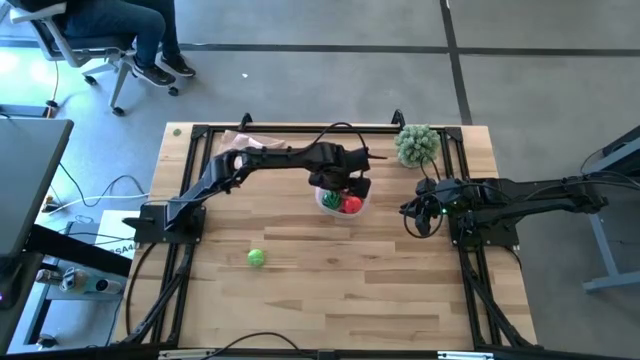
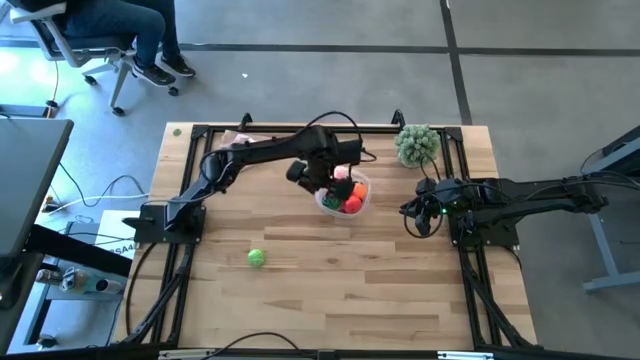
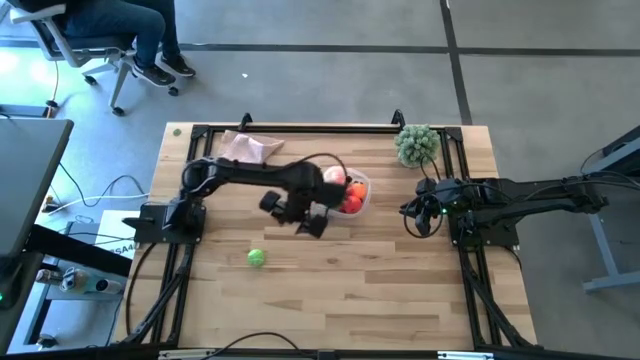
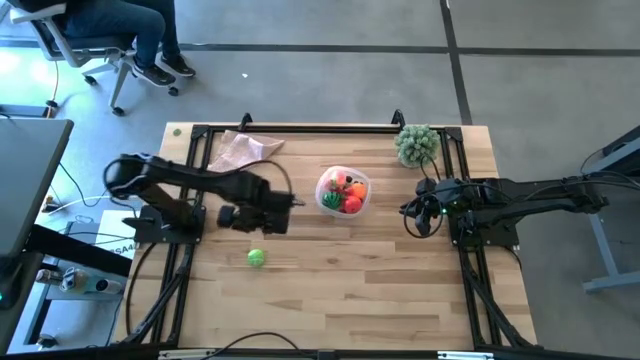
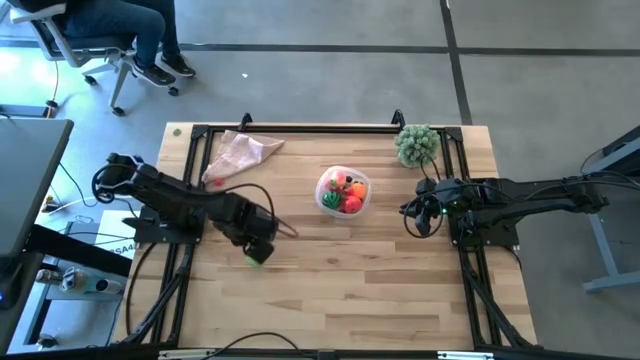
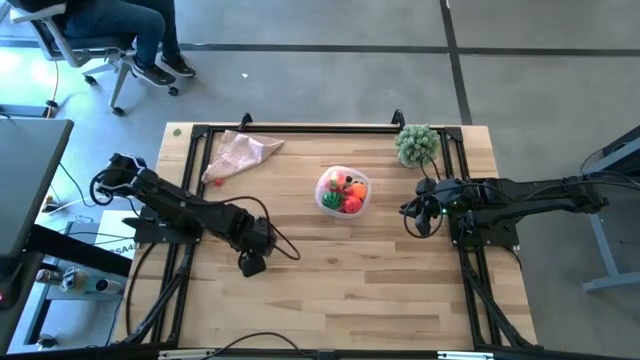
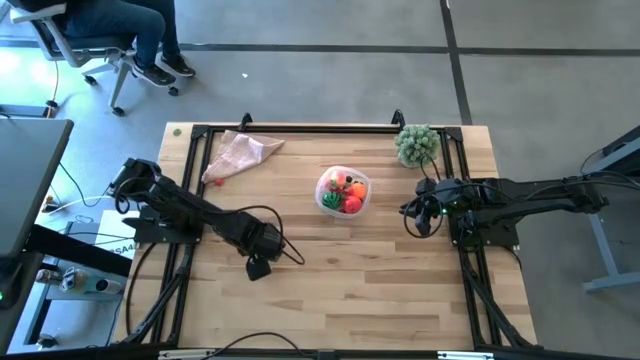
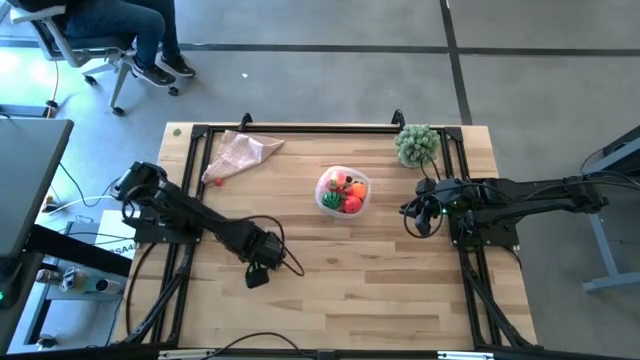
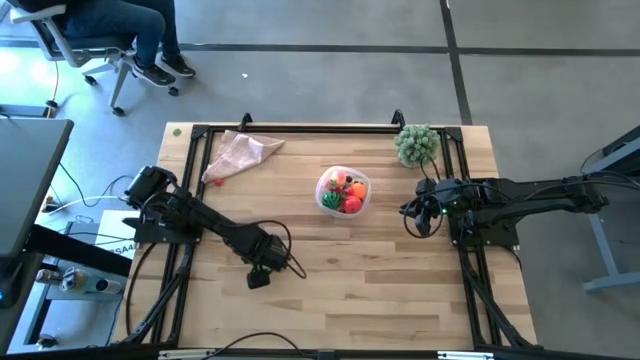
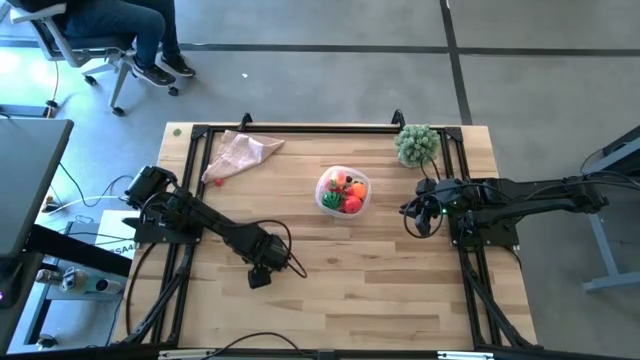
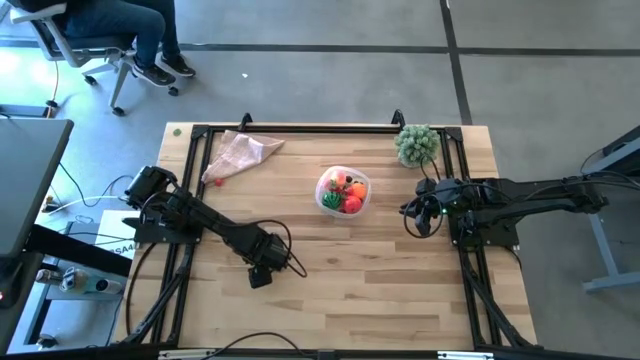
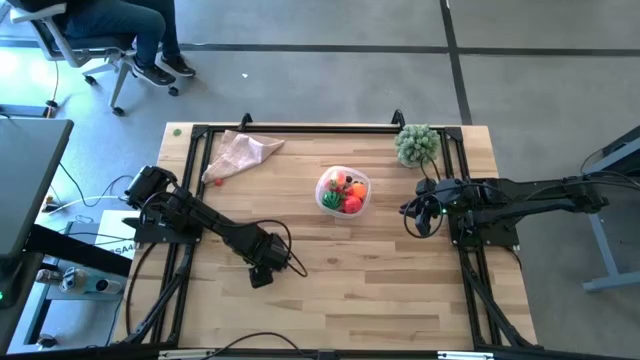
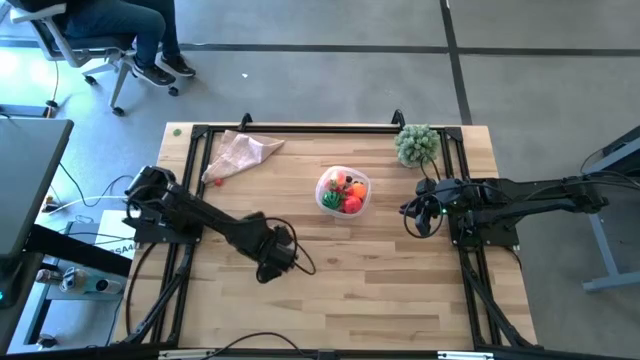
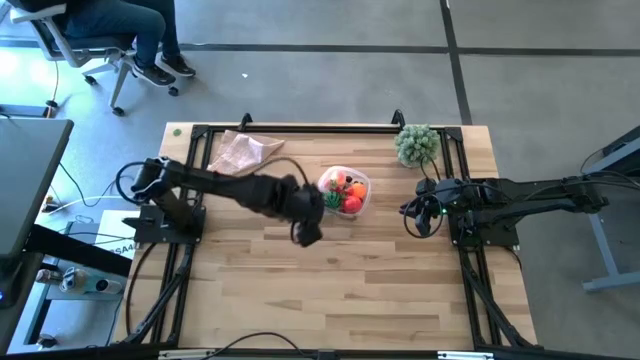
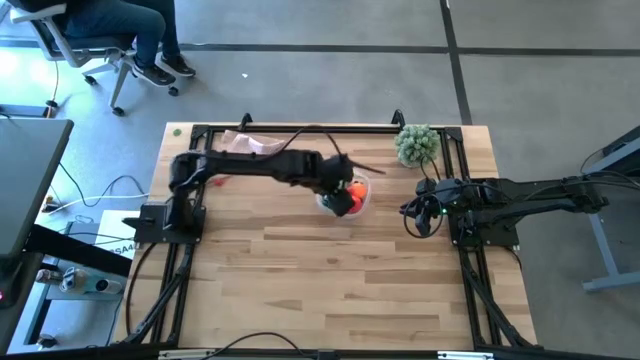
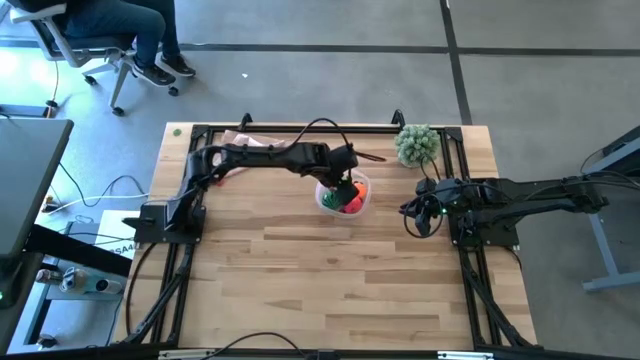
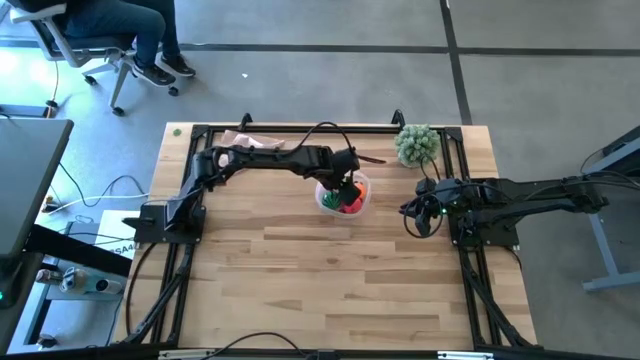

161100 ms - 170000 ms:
Task: Pick and placing Produce into tupperware
Put the cabbage into the transparent bin

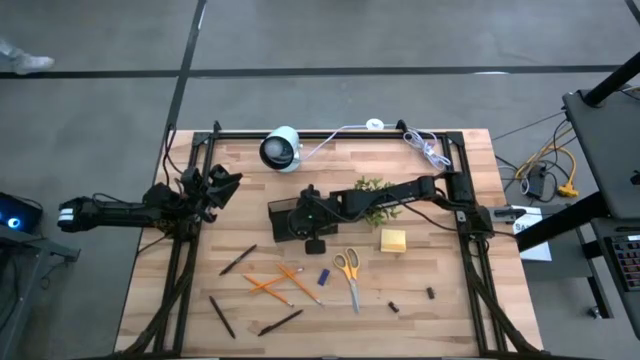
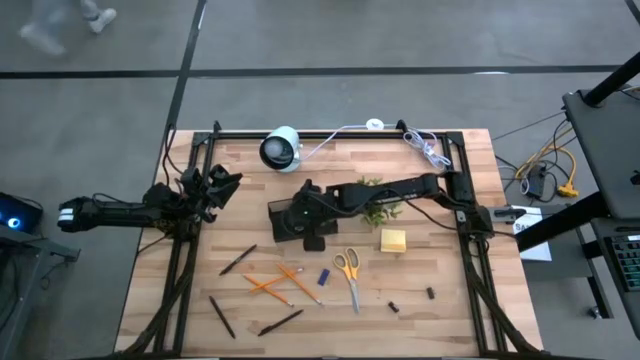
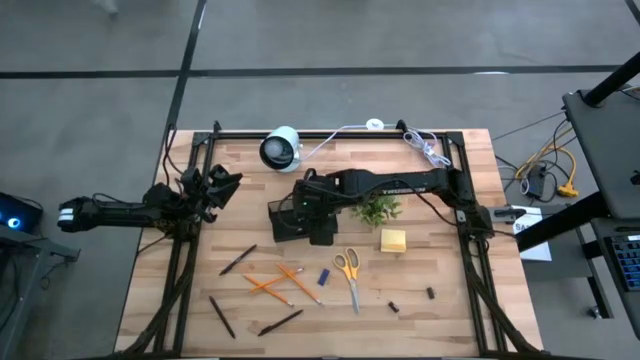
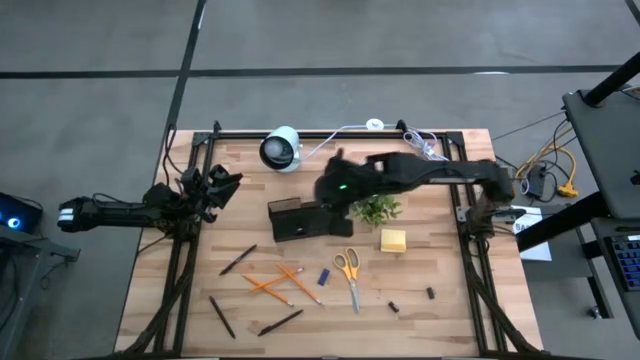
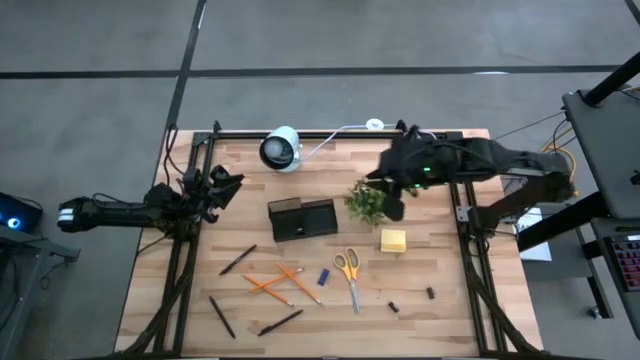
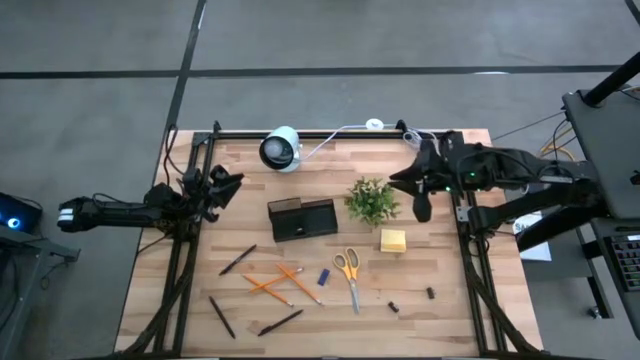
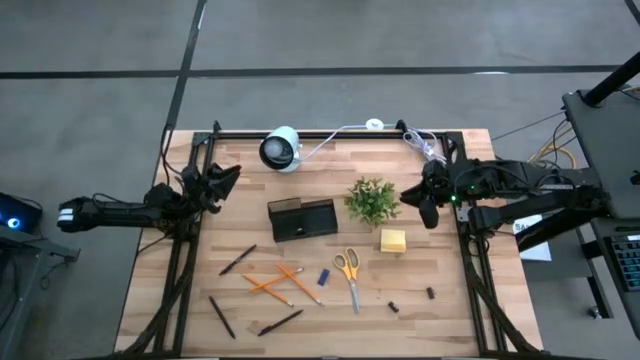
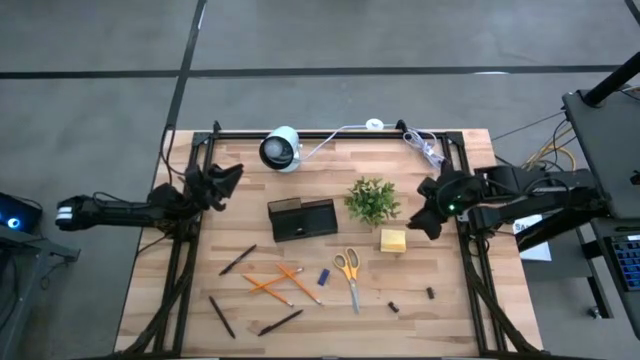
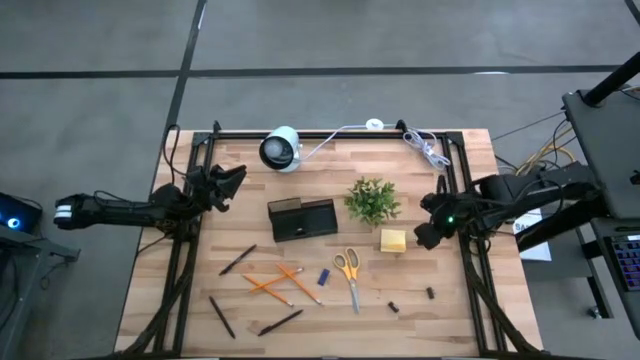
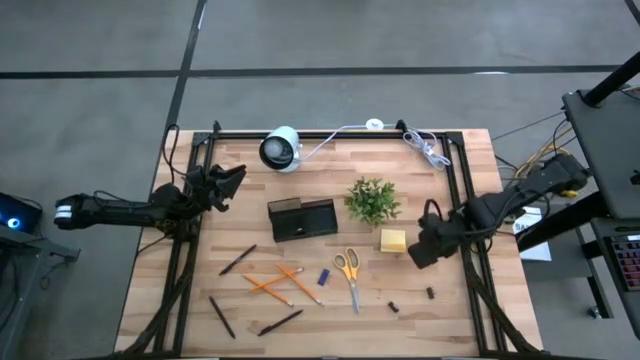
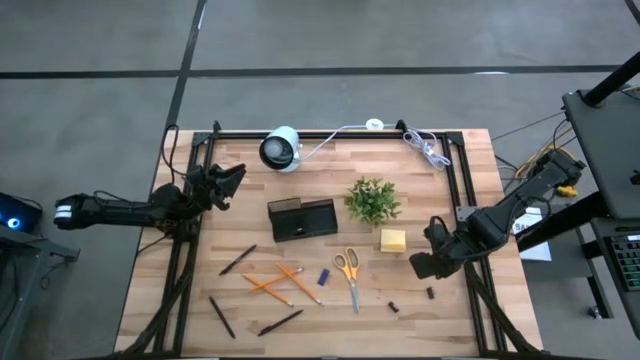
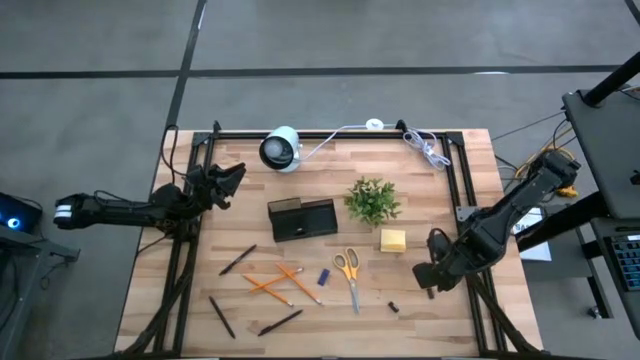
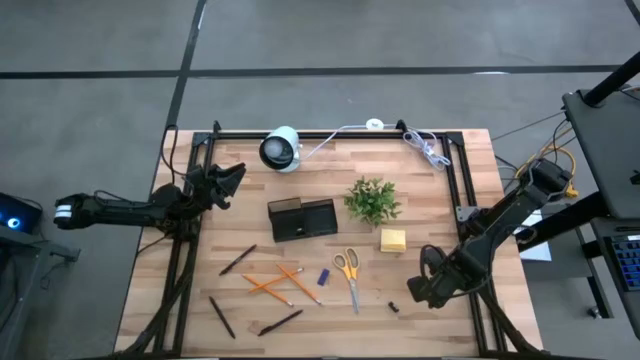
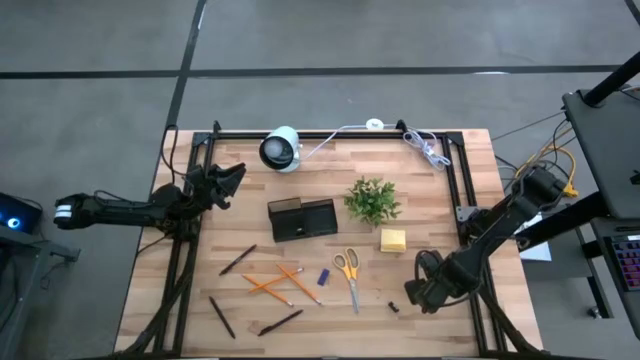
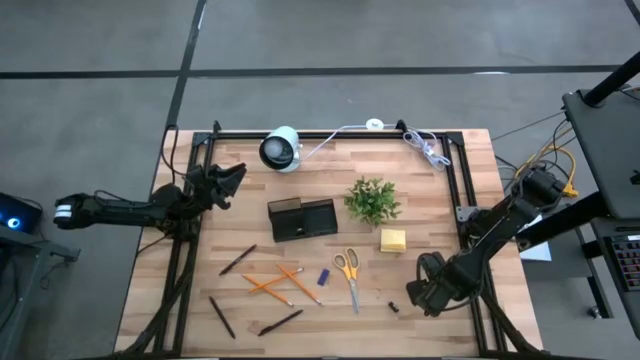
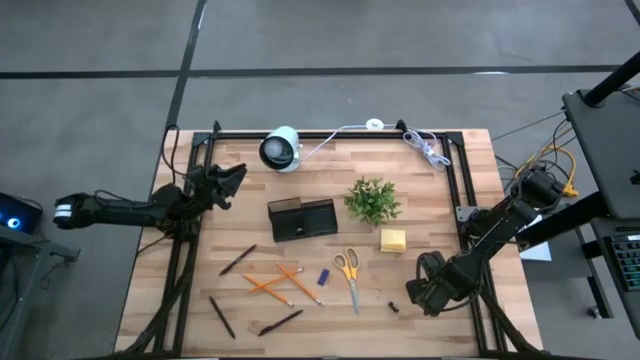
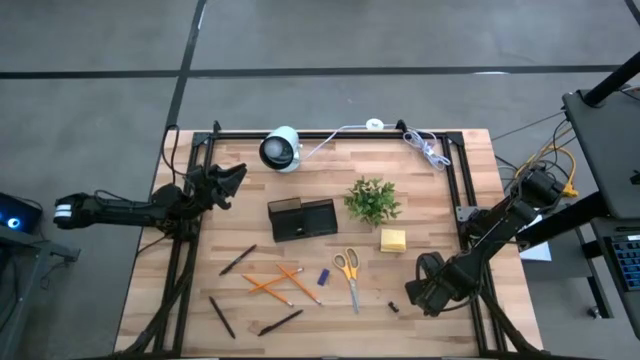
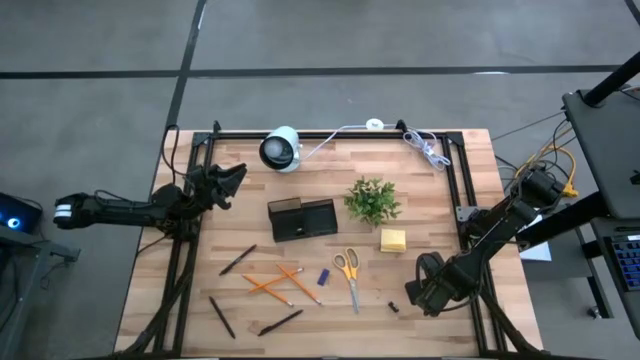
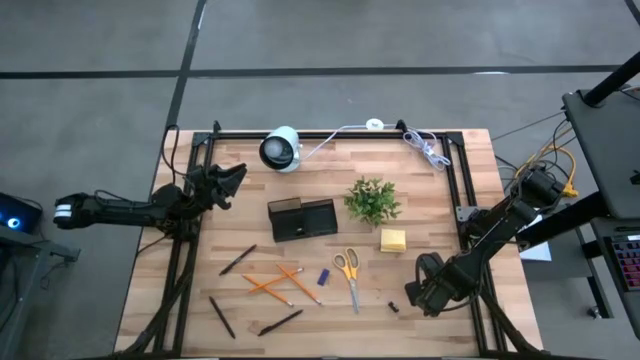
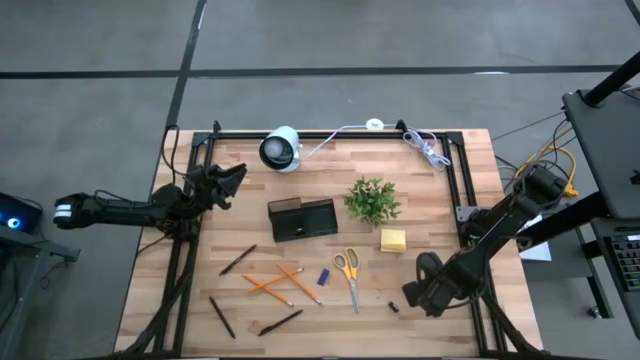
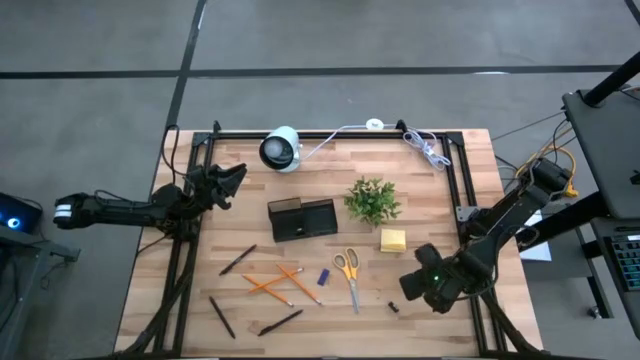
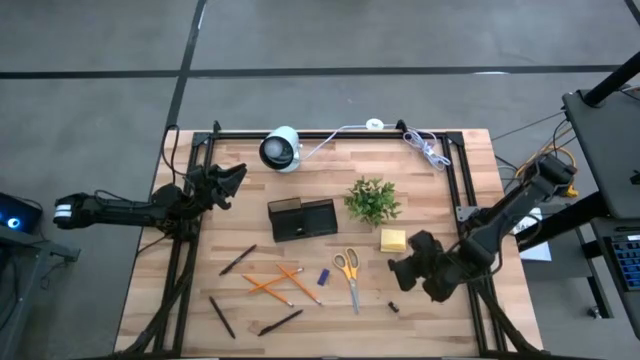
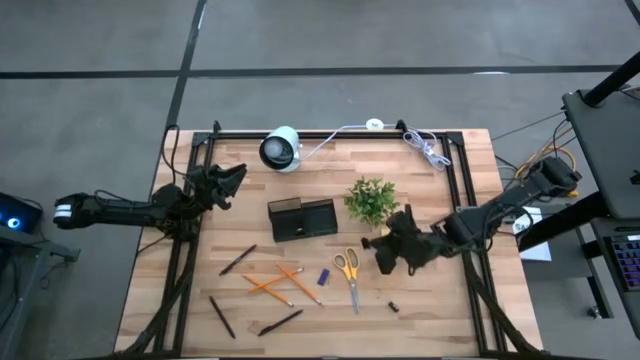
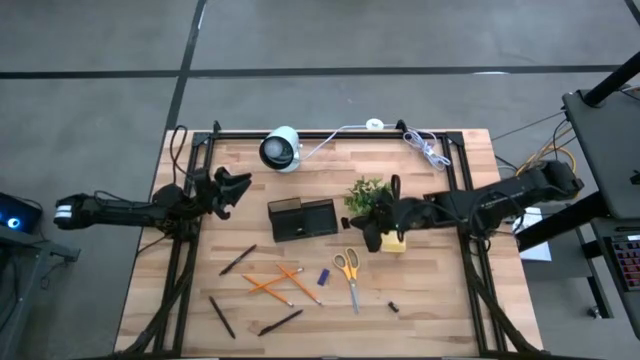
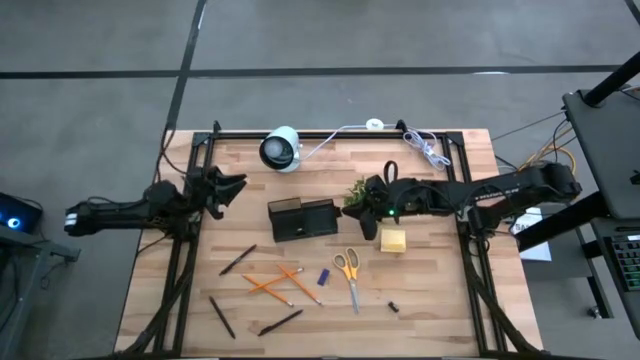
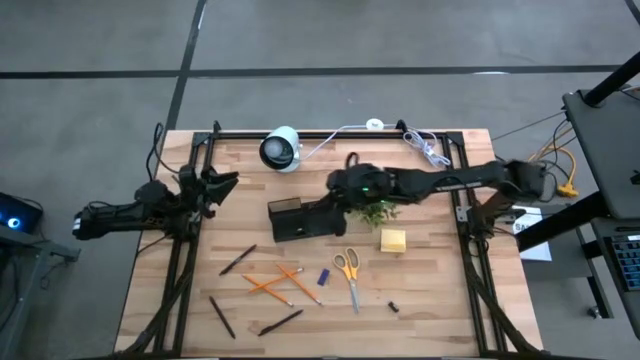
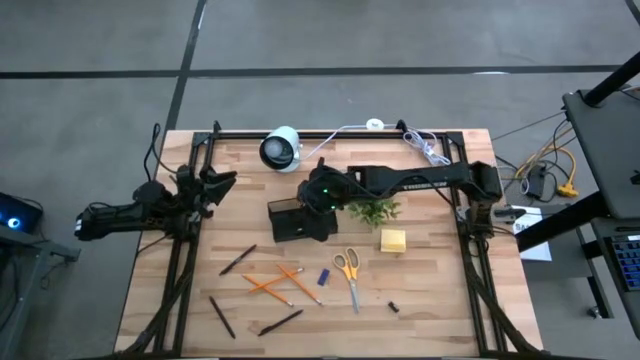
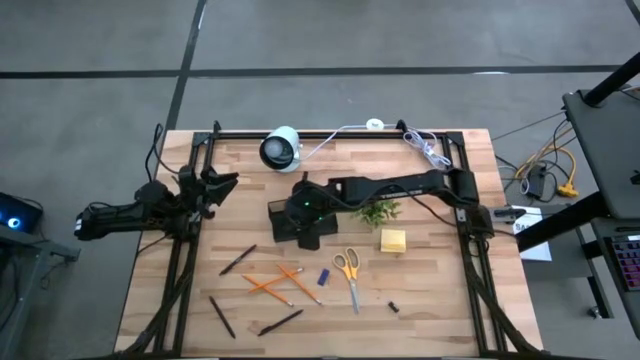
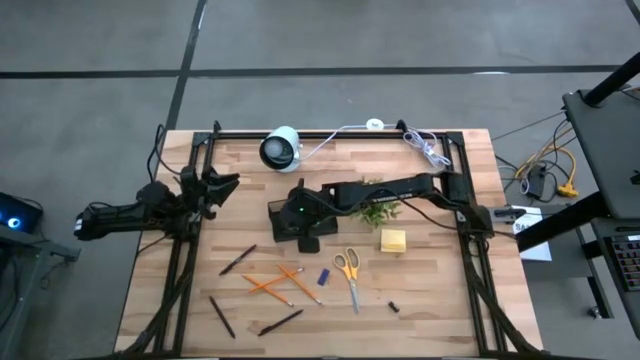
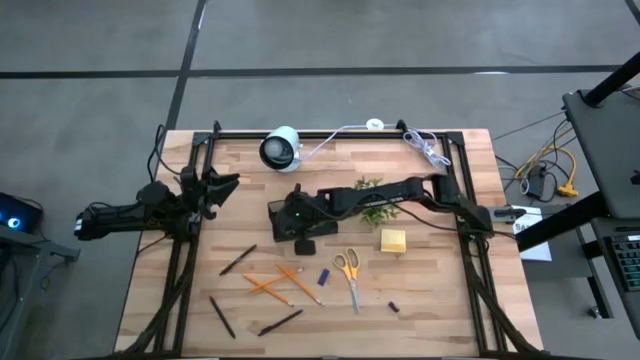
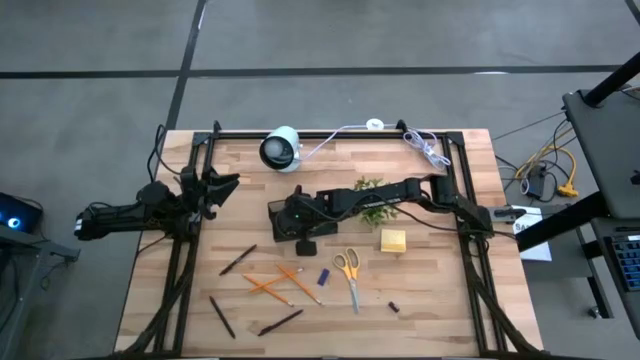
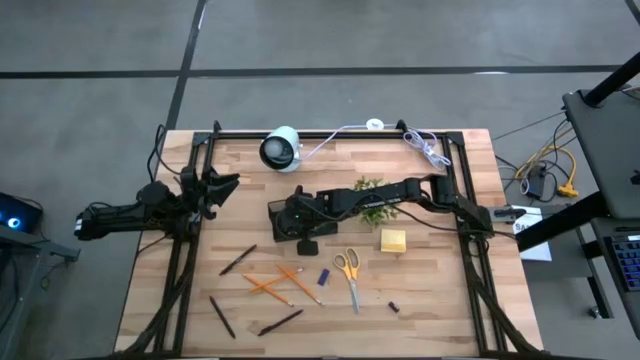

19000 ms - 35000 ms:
Task: Pick and place office supplies into organizer
Put the right binder clip in the black desk organizer
